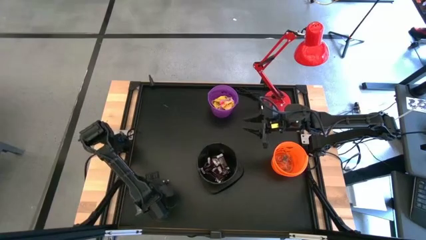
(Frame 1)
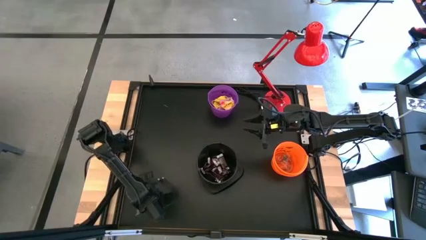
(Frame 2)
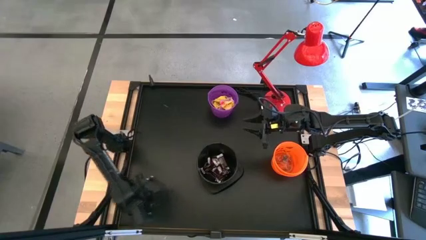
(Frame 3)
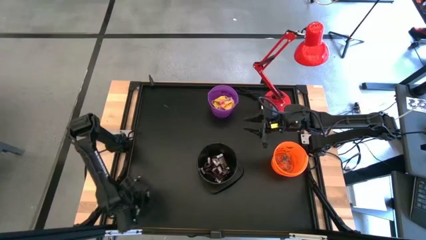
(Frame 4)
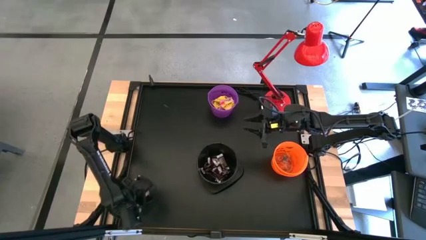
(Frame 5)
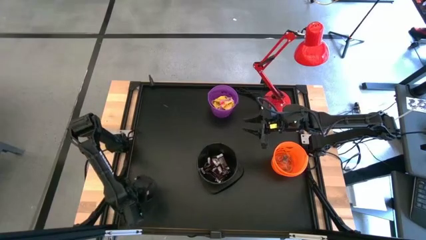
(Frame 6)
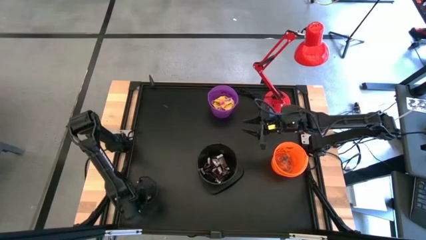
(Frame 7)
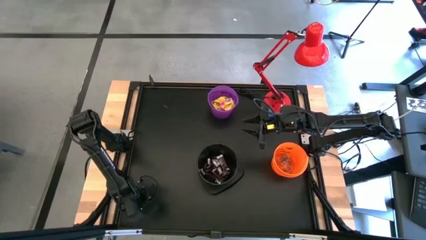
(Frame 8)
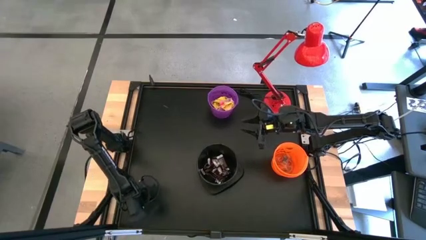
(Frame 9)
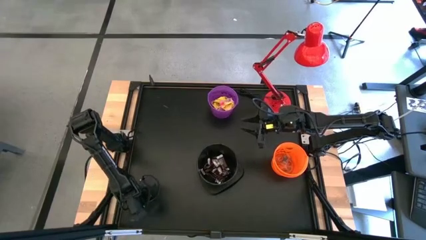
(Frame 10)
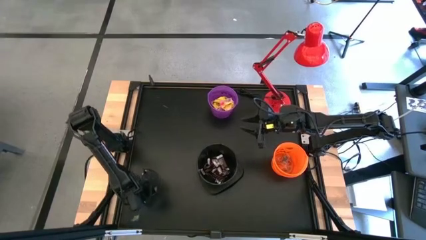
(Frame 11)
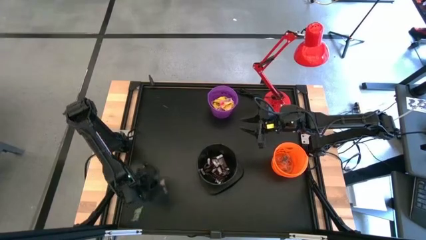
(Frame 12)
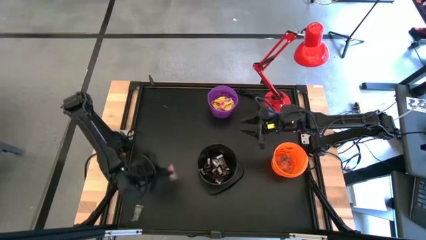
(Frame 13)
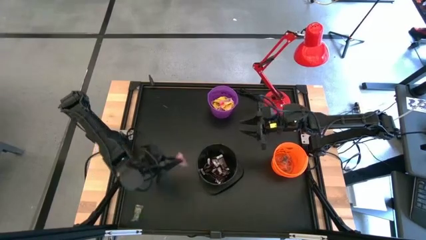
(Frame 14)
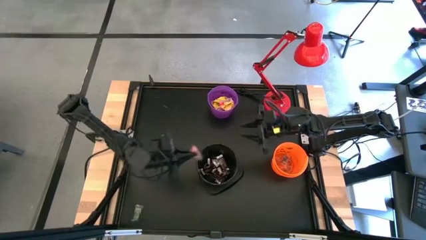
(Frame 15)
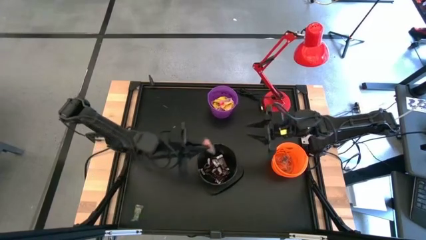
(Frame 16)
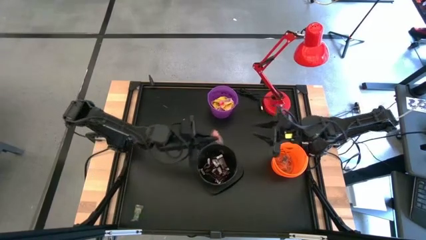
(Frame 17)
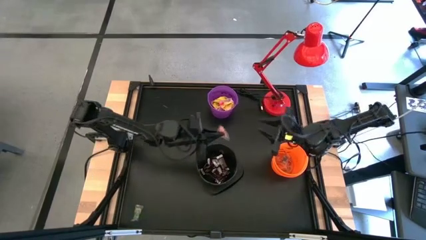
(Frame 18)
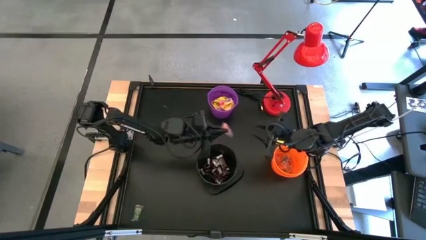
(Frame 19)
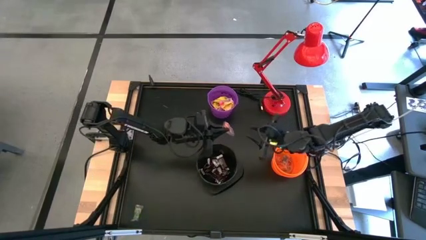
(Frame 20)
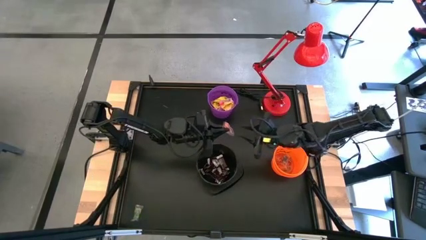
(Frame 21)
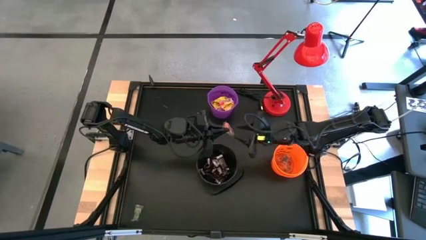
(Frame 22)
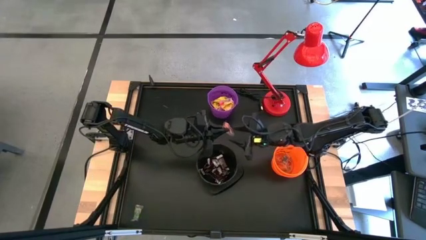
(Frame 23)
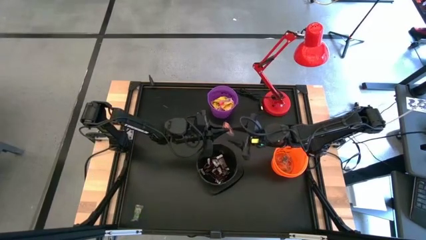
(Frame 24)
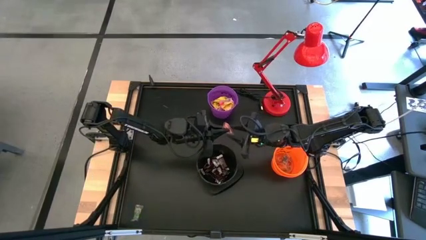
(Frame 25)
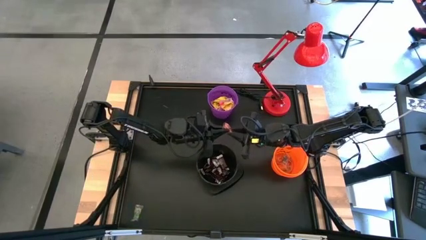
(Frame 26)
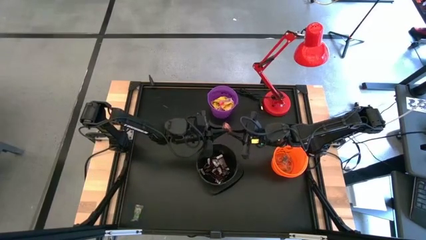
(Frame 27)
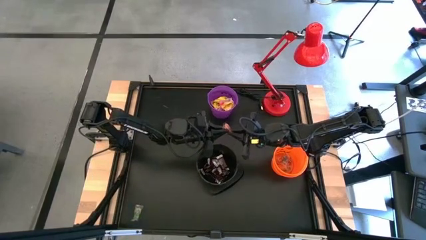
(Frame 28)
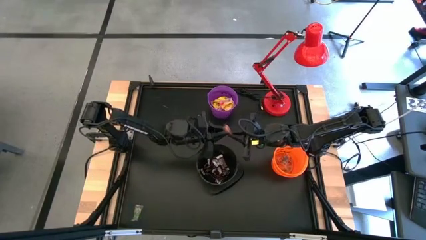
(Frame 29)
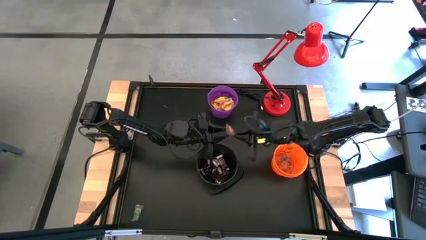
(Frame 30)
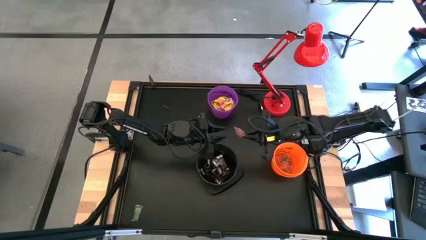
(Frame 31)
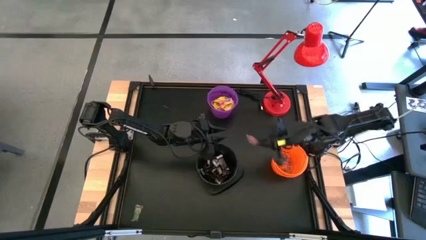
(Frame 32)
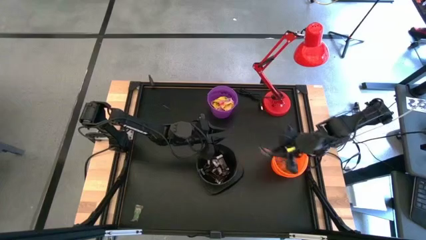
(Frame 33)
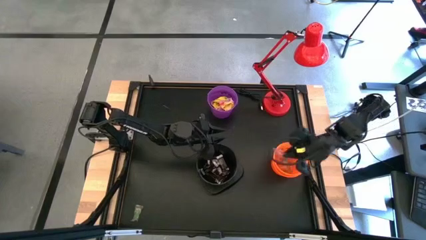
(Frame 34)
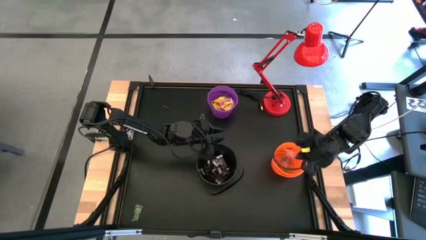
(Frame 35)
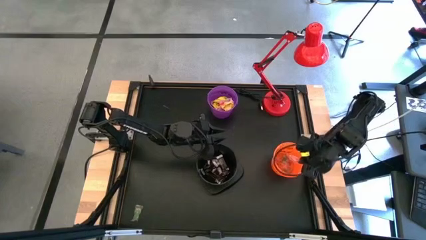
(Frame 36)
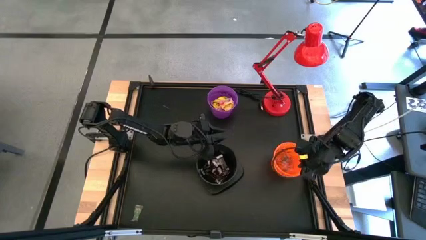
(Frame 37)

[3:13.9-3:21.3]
Task: Sort candy
Put the orange gummy into the orange bucket

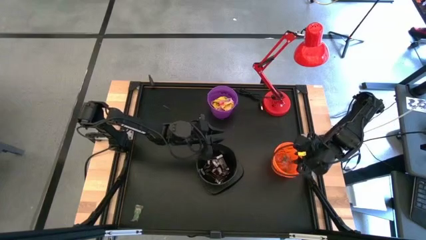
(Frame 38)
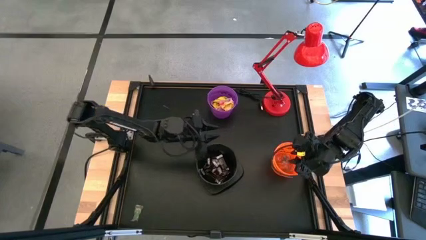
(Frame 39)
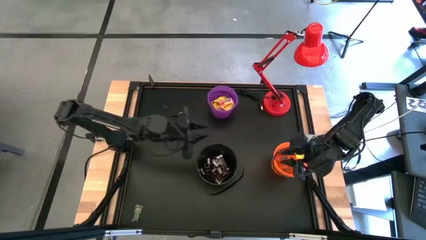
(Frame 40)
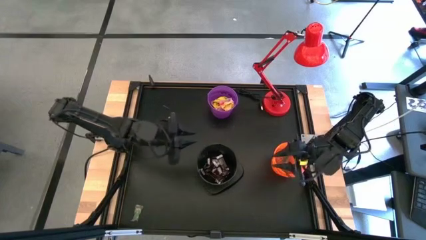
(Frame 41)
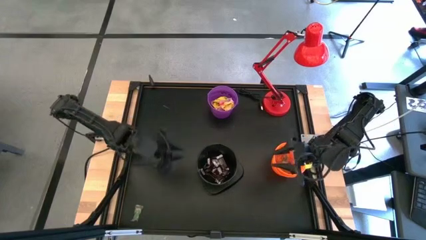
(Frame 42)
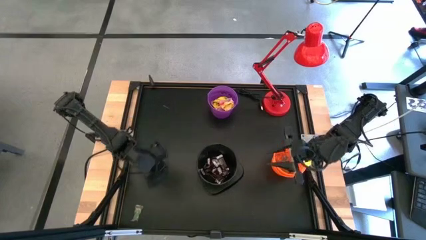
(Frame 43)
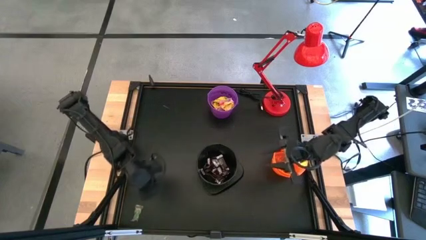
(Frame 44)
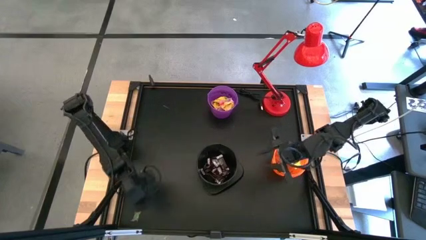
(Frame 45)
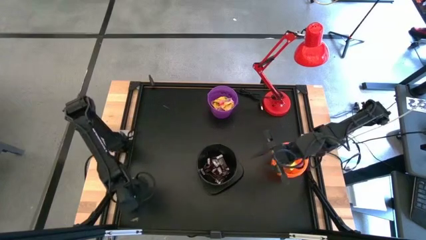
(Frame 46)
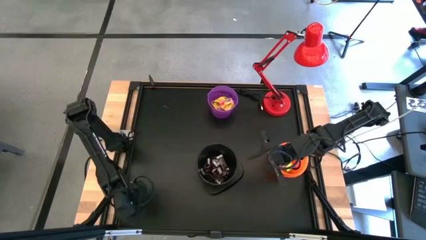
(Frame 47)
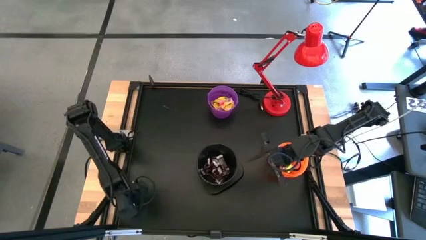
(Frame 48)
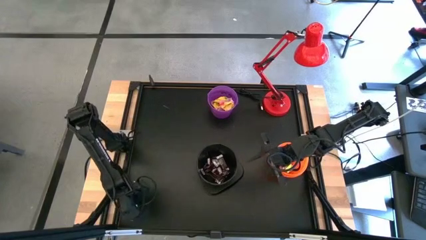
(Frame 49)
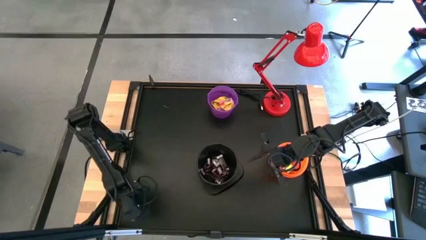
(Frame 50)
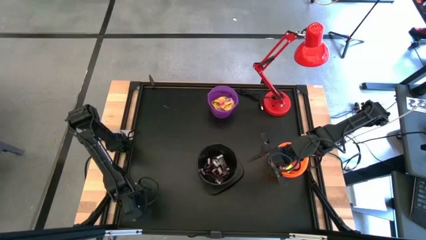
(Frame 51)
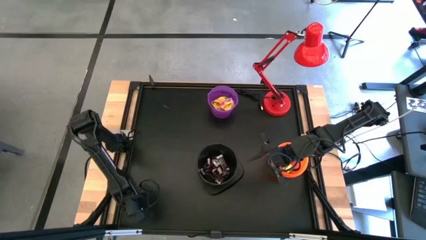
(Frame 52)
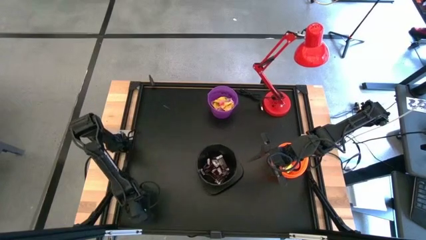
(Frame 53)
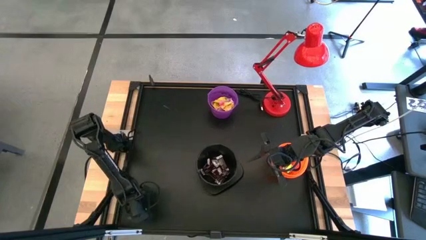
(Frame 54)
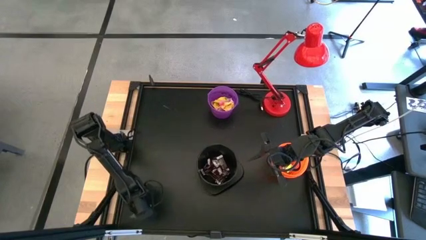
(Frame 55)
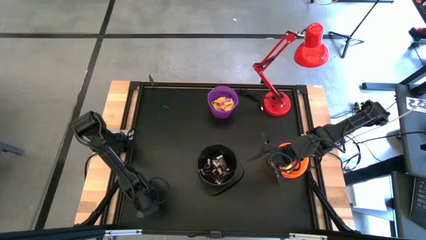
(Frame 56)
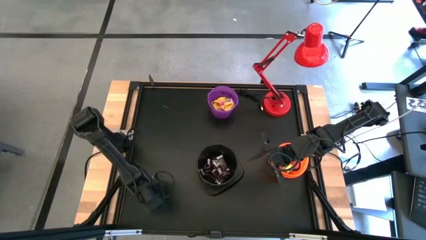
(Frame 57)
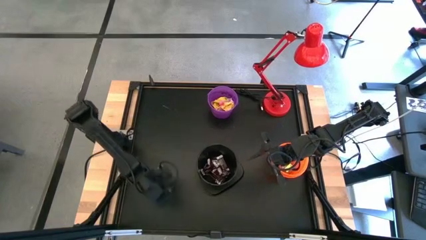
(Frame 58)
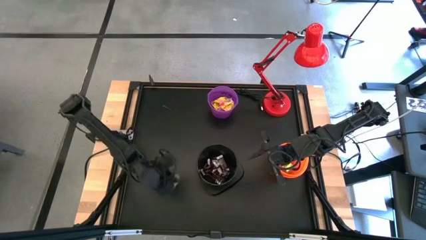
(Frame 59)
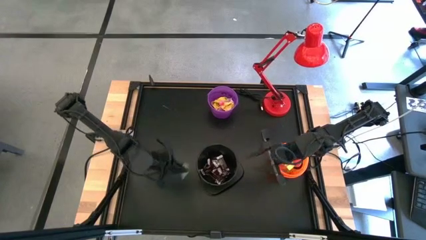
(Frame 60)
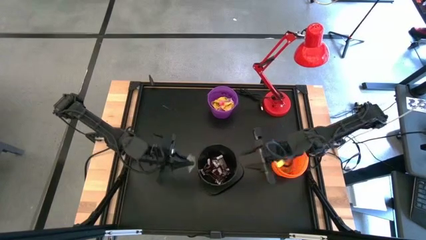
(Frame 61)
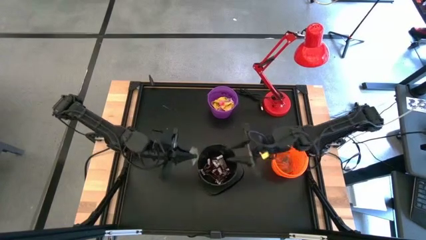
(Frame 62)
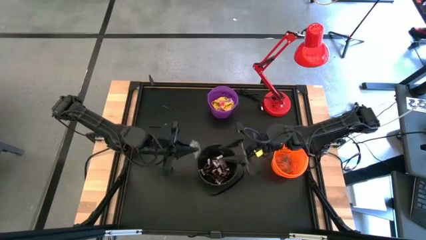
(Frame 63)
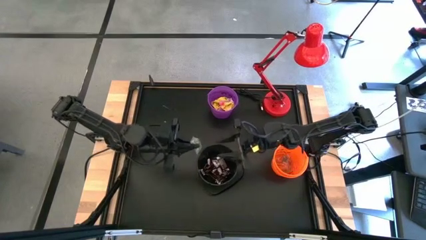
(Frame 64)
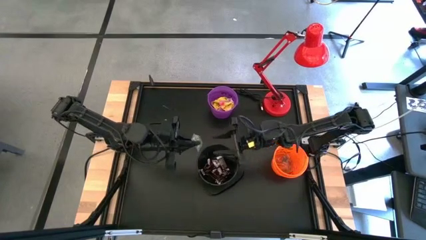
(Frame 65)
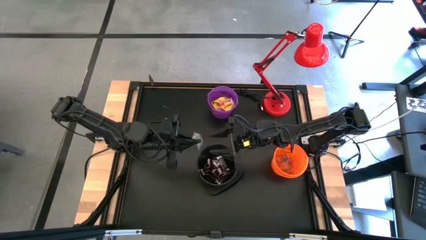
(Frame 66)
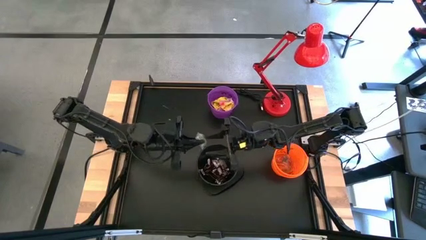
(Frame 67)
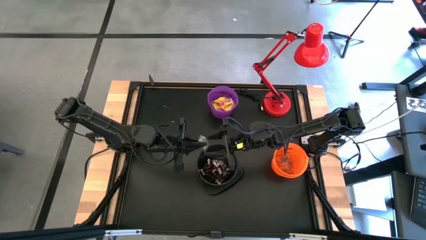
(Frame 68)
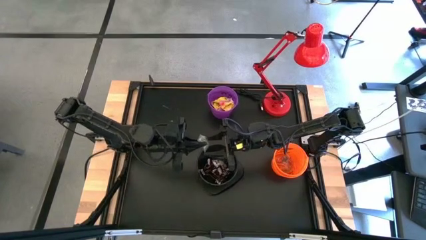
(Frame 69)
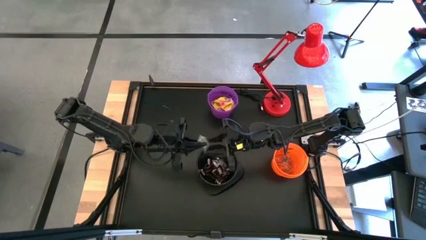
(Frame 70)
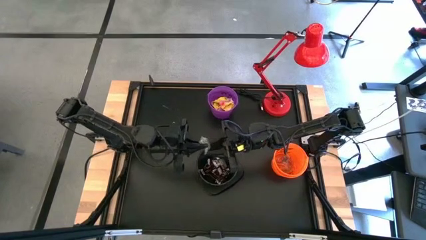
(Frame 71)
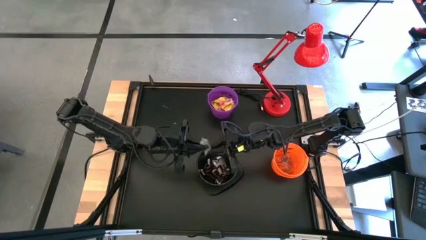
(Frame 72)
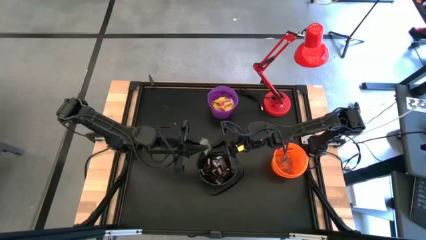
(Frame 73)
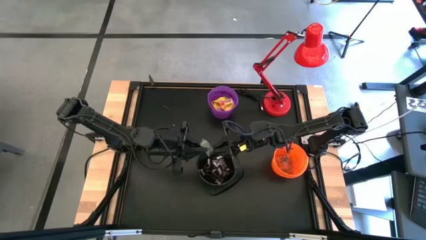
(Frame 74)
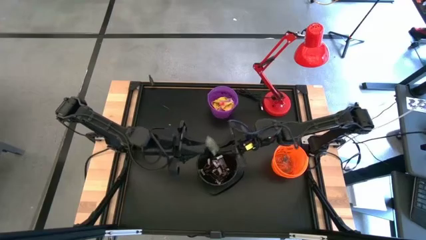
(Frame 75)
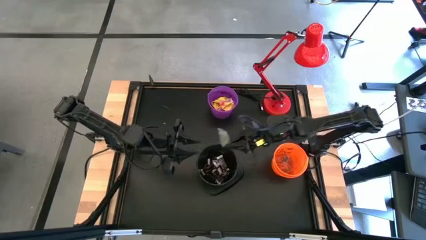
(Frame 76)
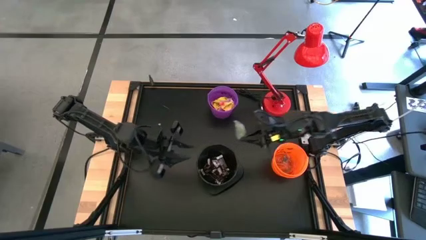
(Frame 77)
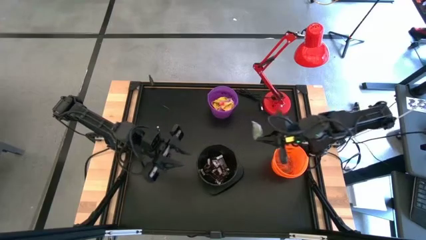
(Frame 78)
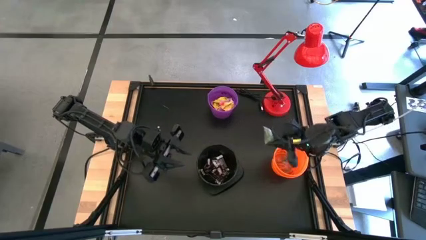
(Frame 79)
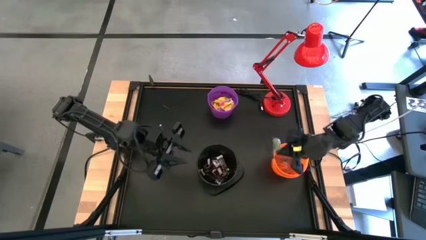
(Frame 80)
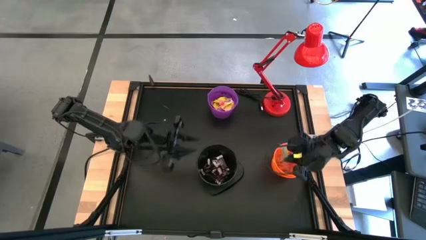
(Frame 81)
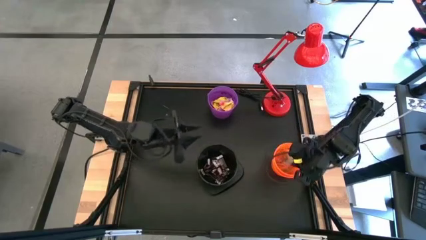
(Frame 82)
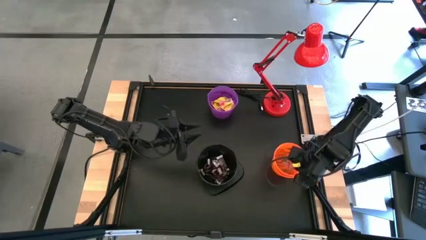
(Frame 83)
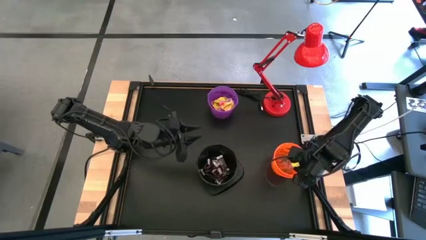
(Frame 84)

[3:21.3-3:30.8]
Put the green gummy into the orange bucket
